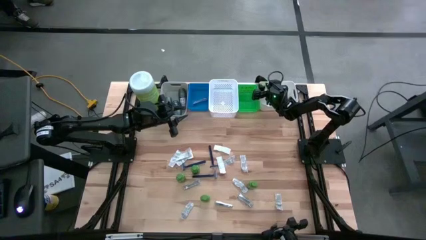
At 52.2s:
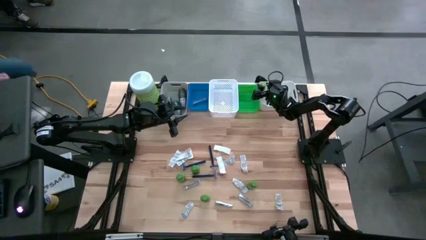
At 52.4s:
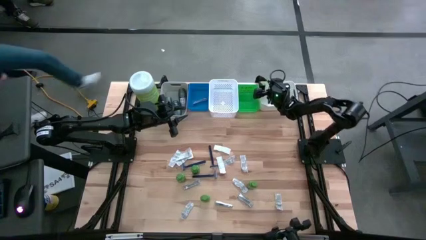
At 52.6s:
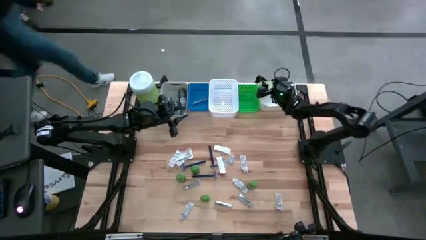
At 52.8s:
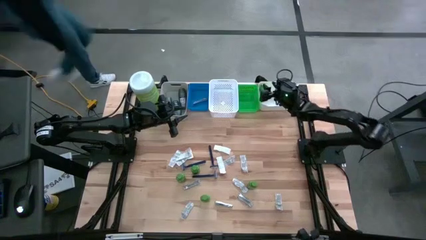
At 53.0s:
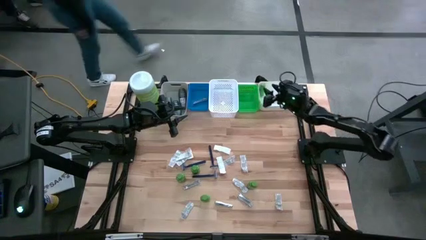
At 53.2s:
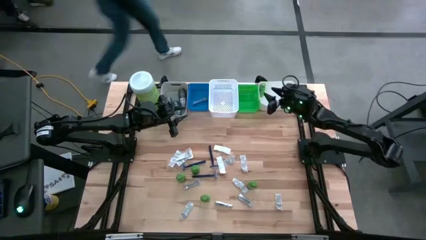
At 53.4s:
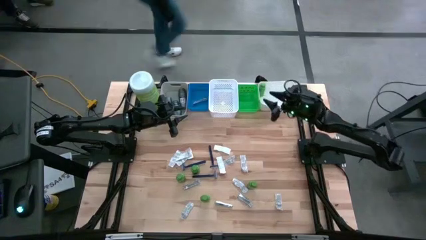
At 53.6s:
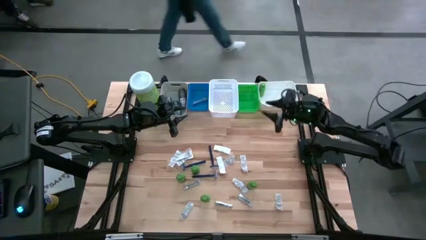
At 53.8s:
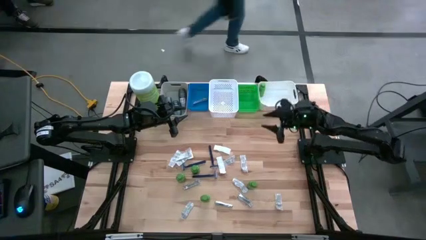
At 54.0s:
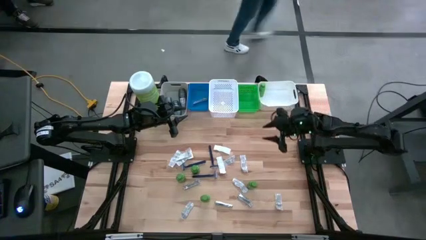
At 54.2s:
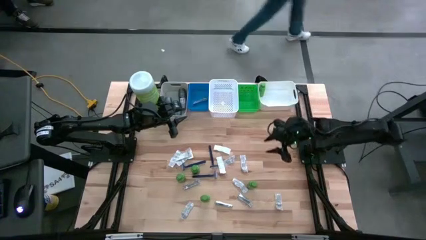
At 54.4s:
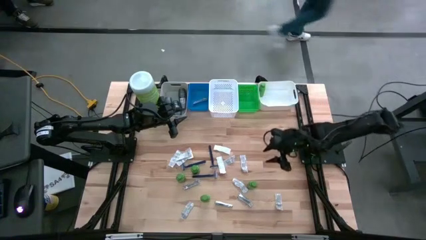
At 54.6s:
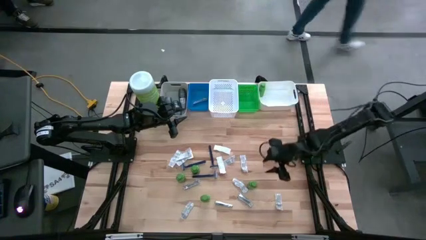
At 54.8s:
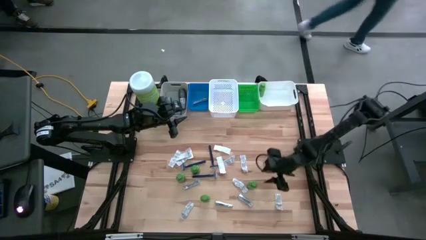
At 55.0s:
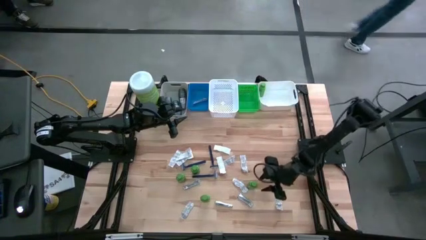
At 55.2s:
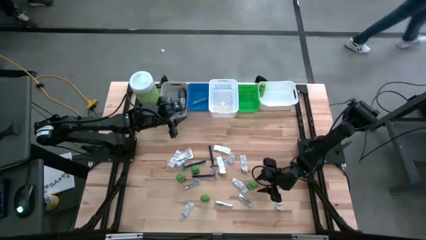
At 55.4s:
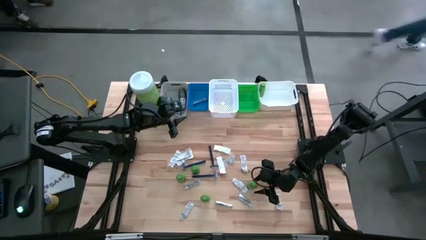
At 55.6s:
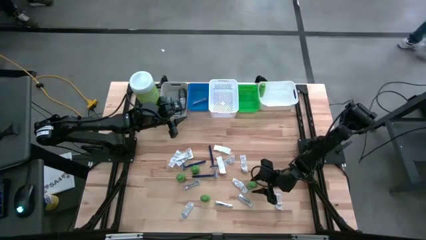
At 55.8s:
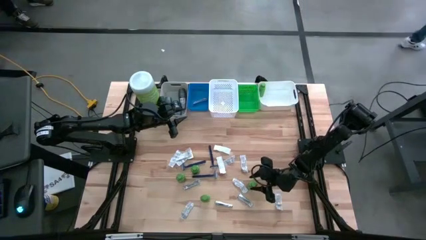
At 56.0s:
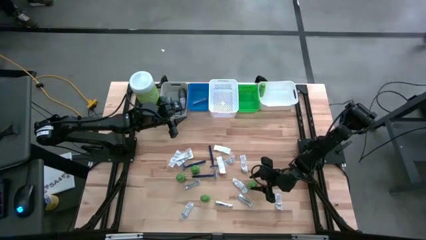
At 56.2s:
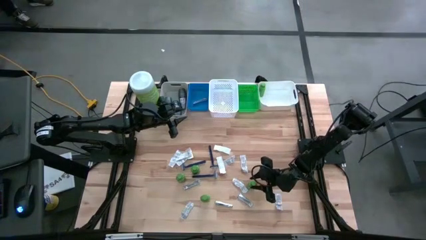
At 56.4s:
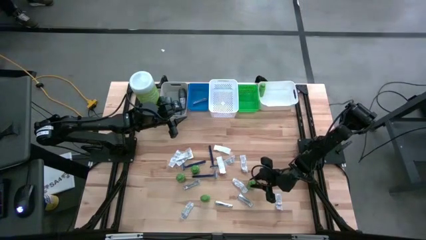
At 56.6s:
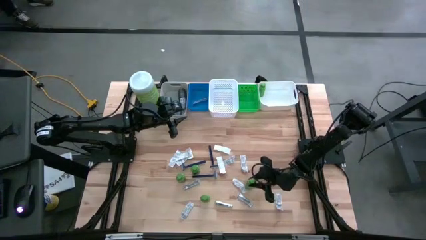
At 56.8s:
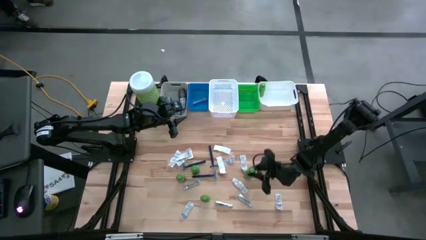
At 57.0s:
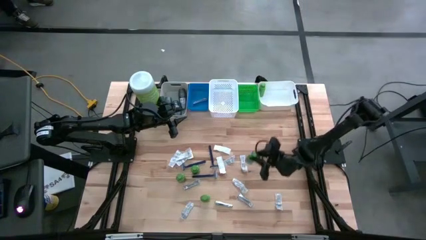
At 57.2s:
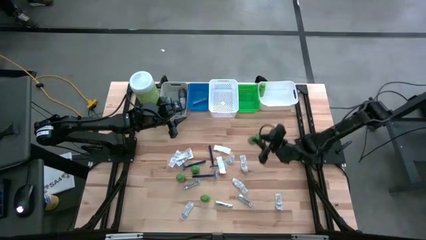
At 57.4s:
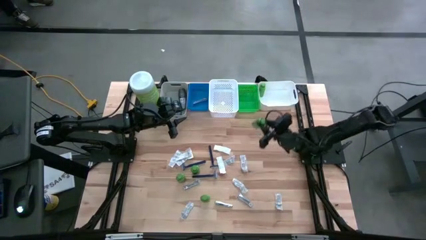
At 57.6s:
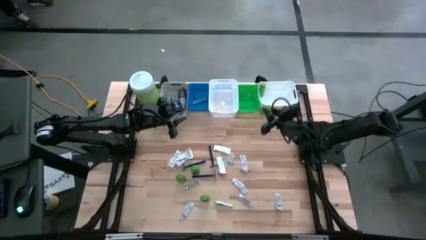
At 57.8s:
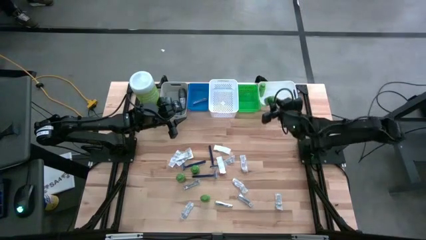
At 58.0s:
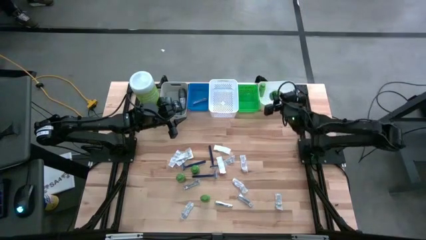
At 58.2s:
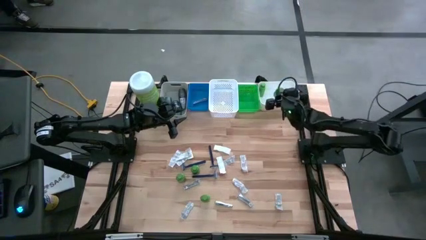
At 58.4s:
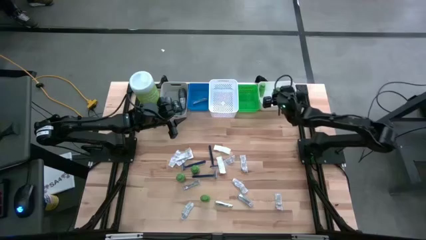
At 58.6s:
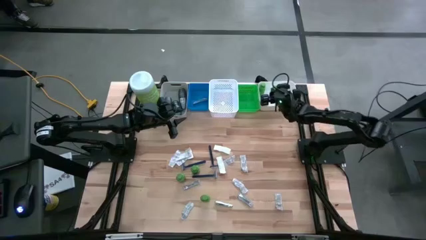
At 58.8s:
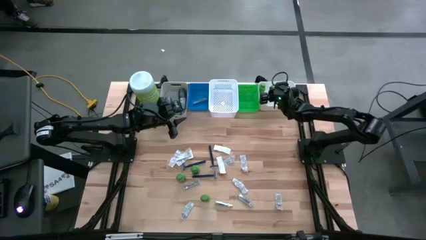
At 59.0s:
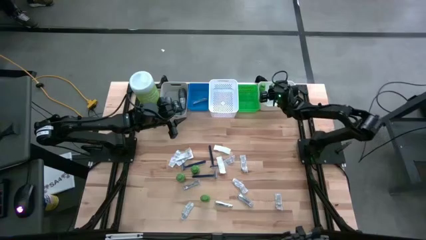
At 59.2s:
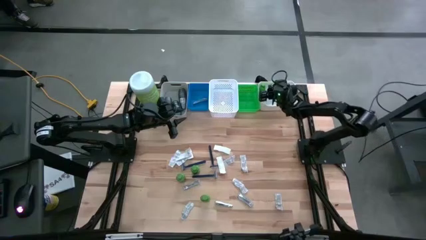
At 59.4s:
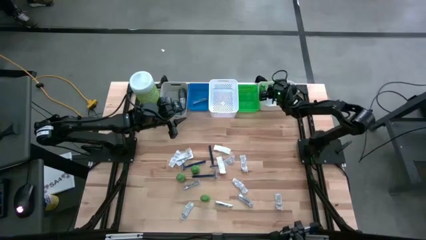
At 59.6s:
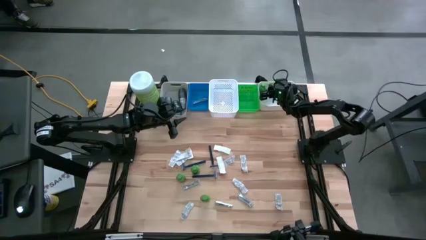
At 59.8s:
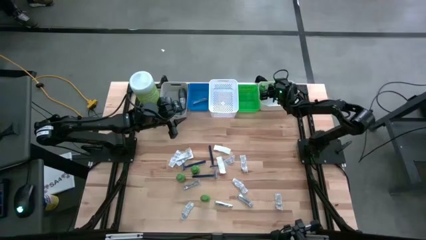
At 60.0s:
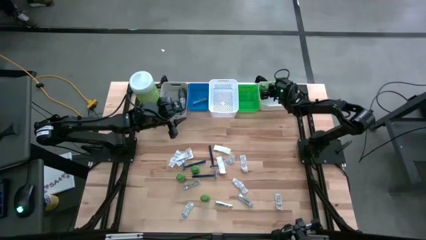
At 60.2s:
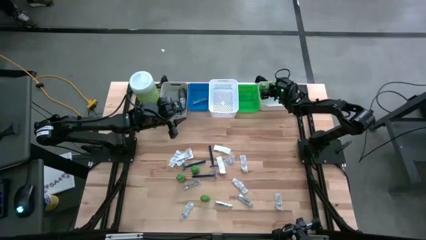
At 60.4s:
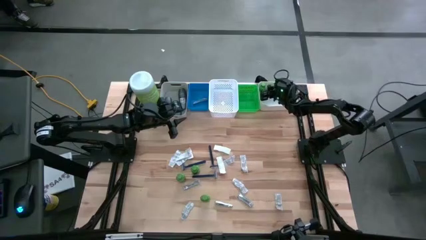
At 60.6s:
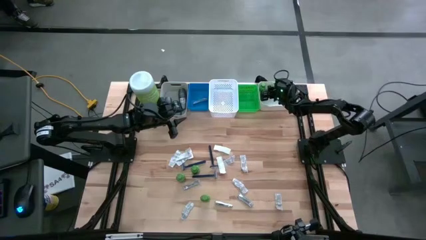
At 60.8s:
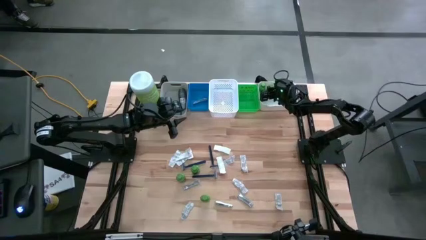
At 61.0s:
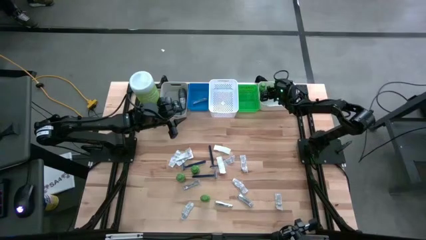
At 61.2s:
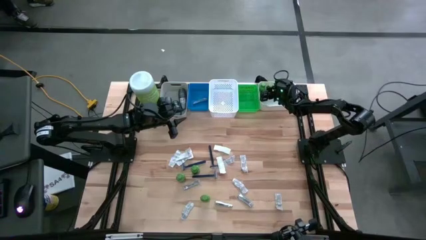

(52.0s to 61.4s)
Task: Pick & Place Travel size toiletries
Put the green shampoo into the right white bin

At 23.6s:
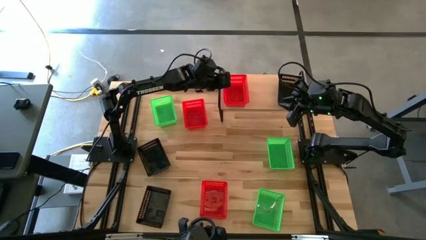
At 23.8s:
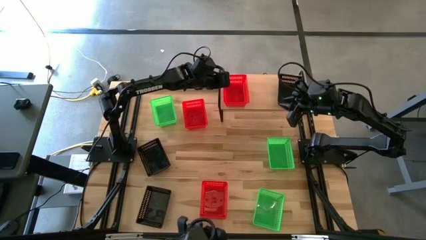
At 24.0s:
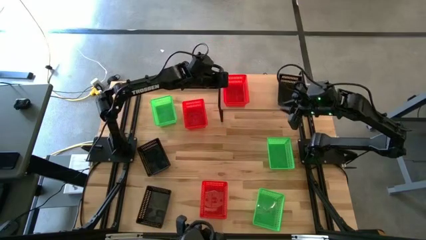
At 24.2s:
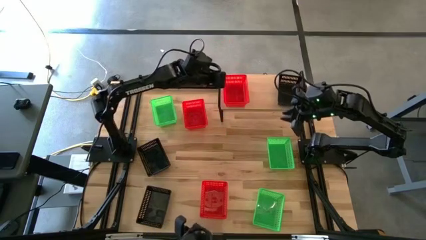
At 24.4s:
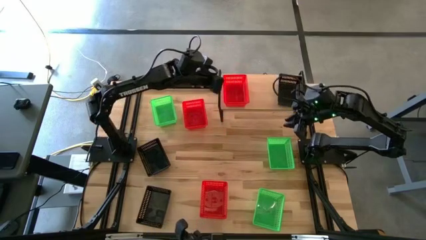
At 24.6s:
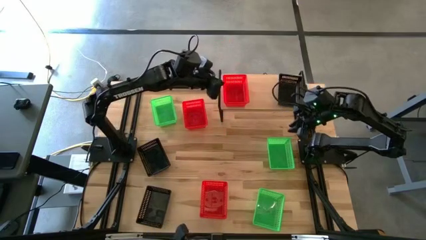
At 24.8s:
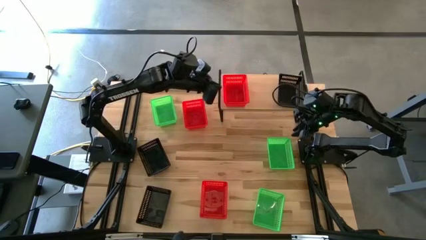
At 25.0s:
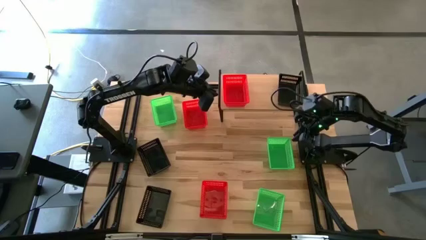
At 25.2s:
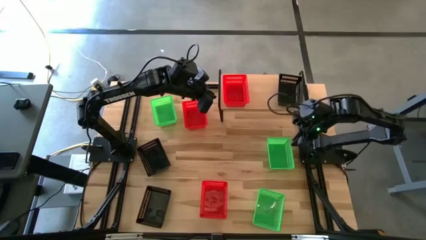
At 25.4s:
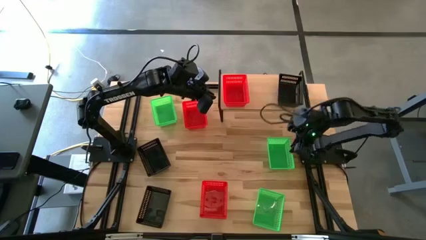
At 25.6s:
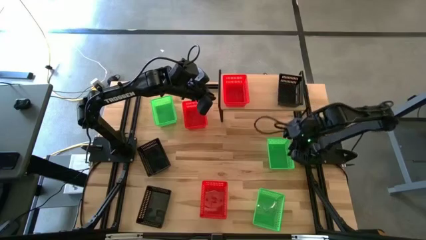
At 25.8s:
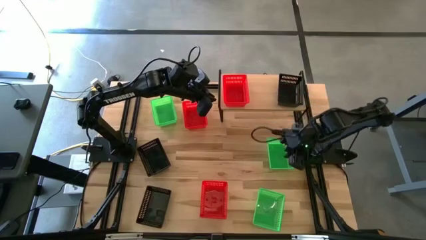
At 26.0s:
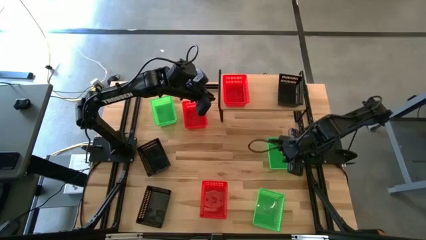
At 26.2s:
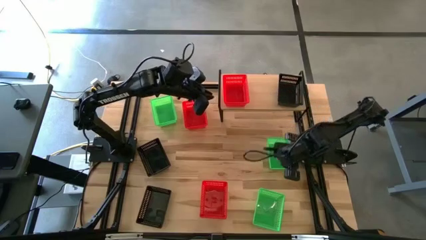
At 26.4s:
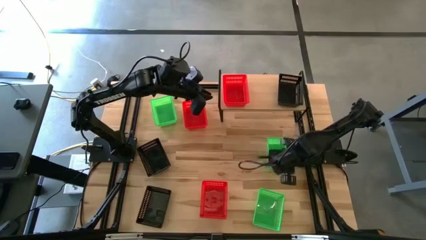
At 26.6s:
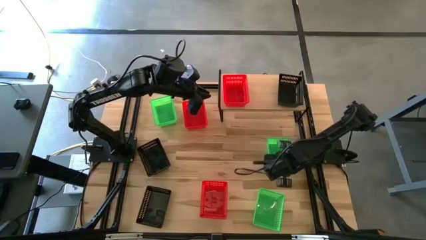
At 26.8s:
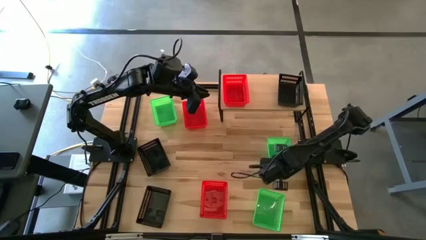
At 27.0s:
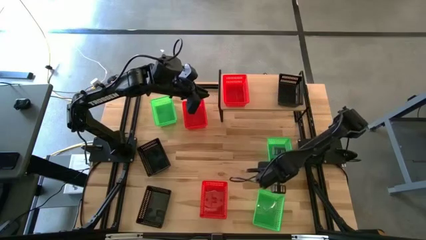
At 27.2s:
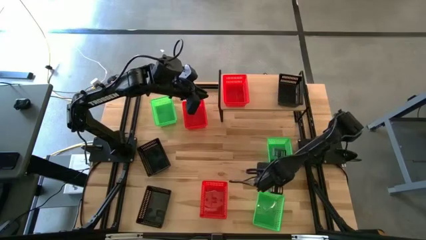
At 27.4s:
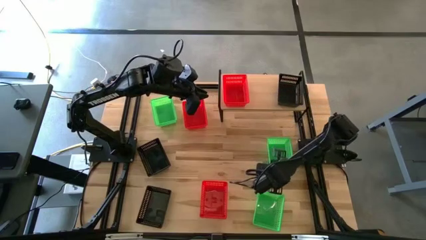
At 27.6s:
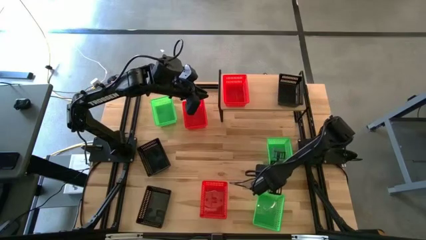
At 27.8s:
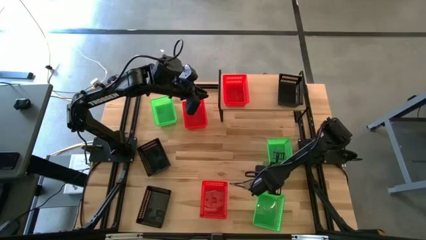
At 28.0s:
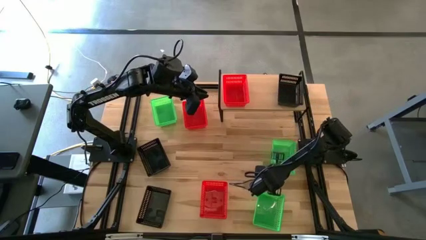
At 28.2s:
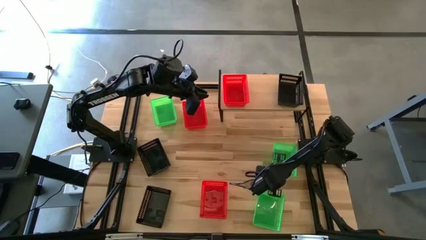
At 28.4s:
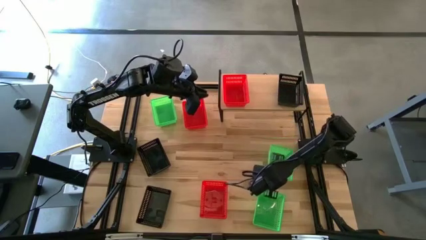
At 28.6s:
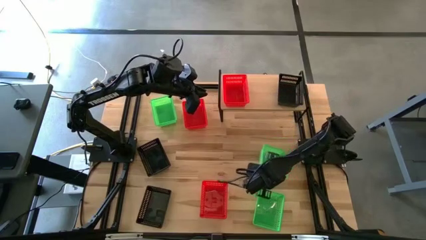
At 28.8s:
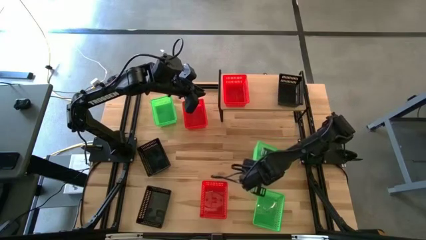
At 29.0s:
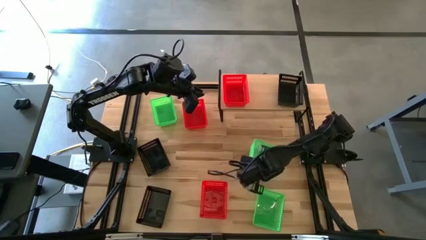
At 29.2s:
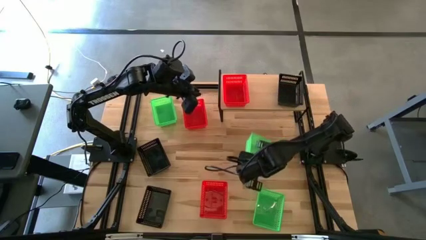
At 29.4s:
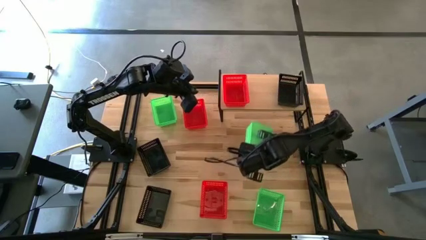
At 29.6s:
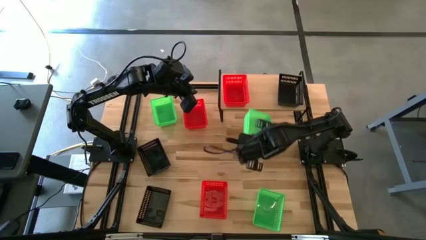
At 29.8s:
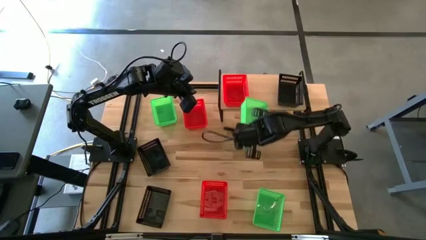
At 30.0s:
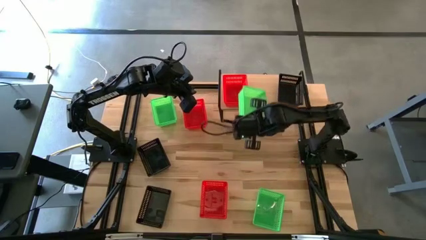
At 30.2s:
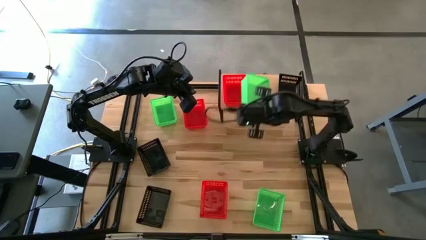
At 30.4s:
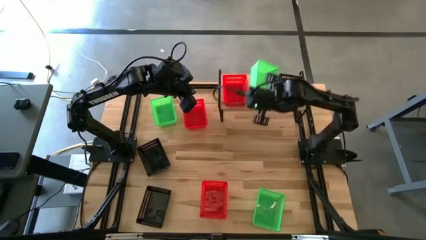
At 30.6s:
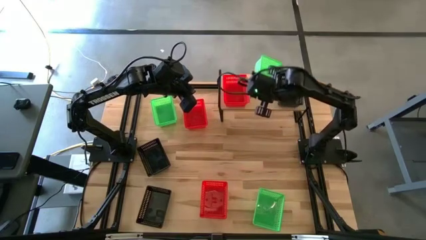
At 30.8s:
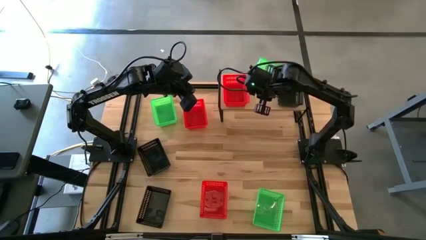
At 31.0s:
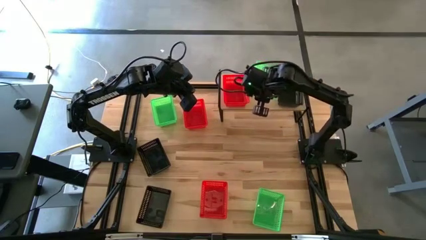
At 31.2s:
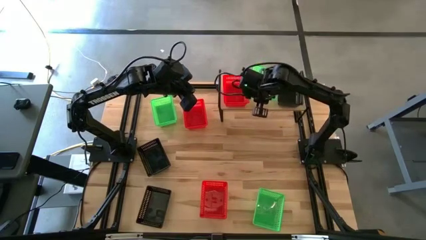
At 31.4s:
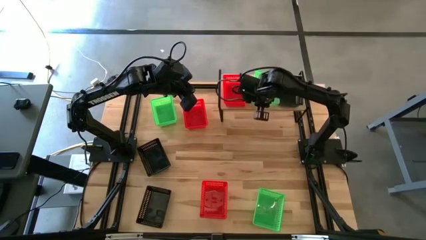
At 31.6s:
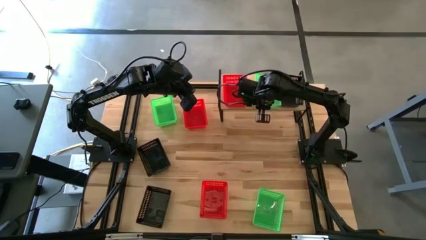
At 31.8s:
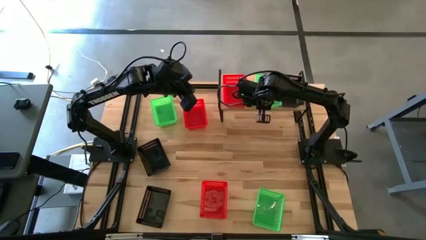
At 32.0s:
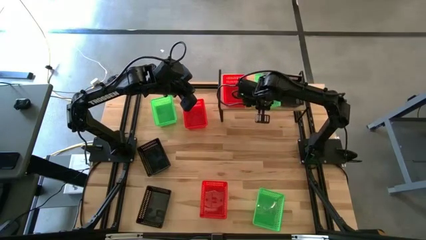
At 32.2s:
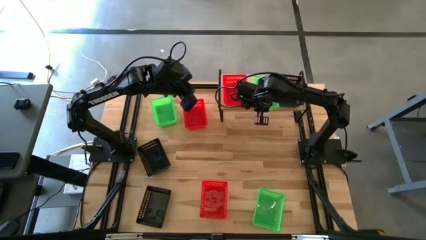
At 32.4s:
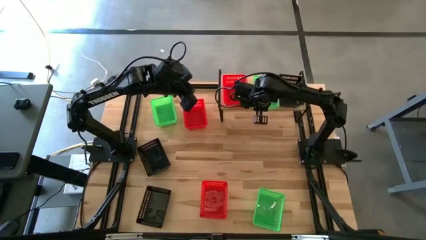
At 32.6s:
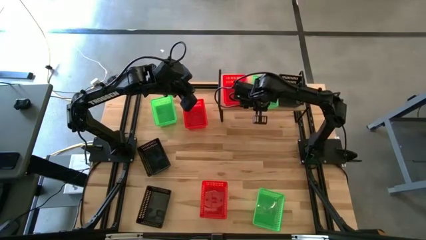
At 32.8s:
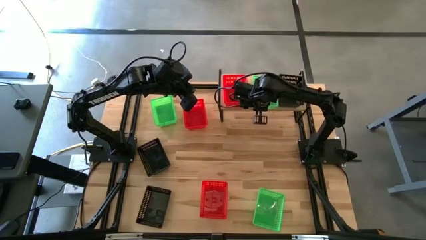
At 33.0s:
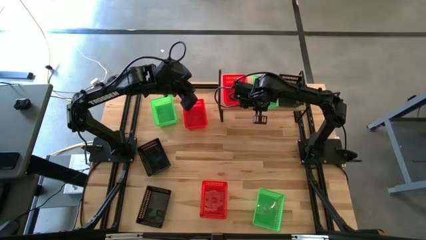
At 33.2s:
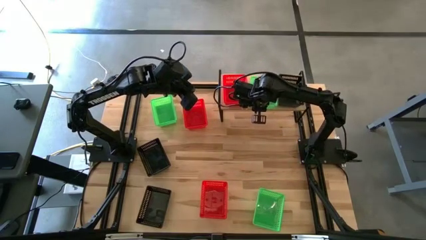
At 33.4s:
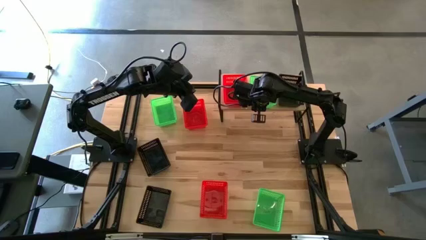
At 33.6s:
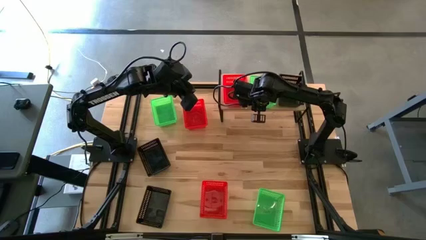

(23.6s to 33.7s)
Task: Stack baskets on shelf by color
Put the middle right green bin on the shelf
